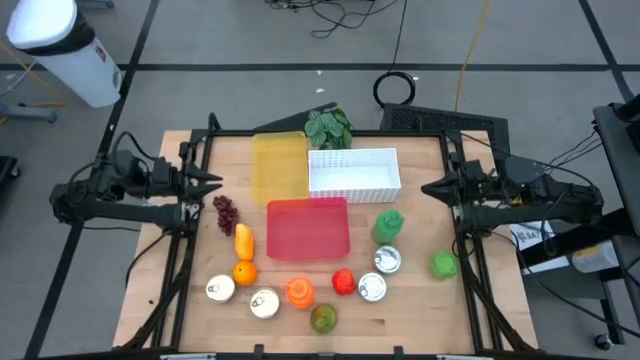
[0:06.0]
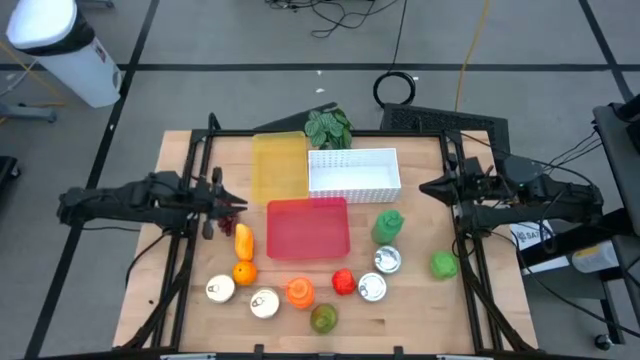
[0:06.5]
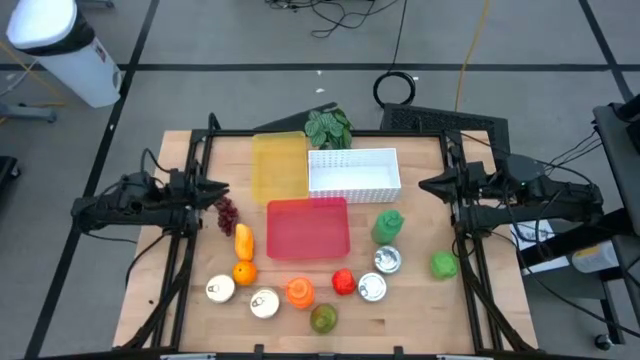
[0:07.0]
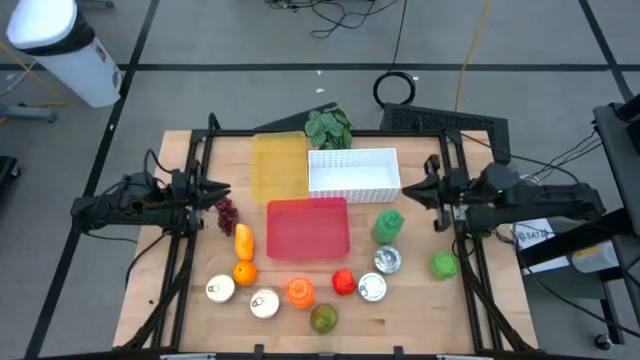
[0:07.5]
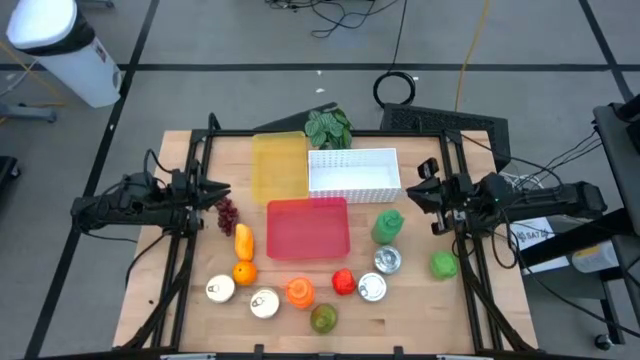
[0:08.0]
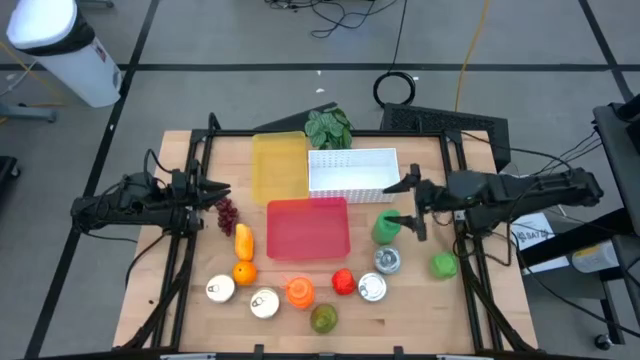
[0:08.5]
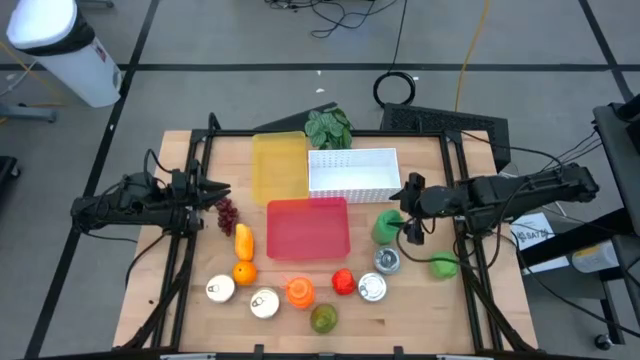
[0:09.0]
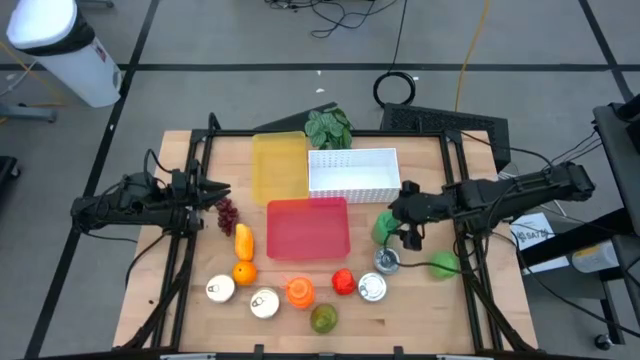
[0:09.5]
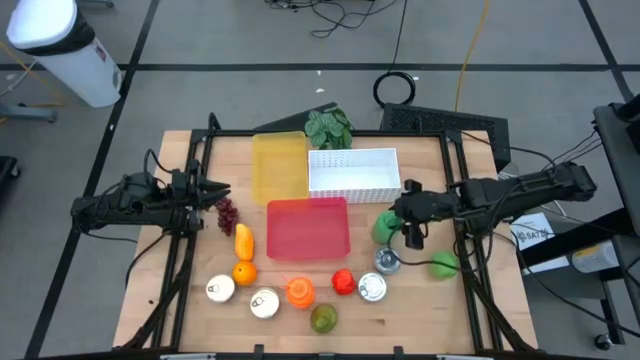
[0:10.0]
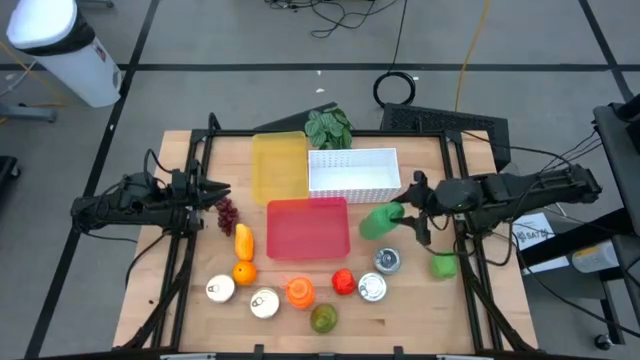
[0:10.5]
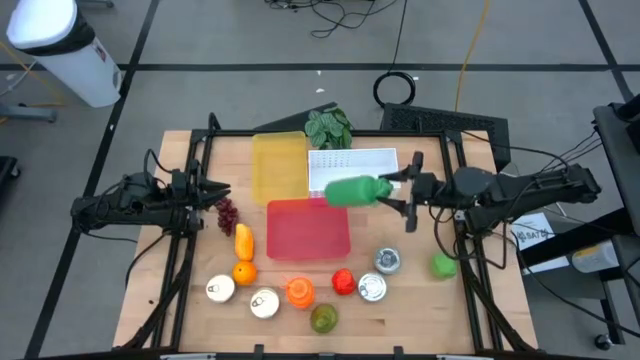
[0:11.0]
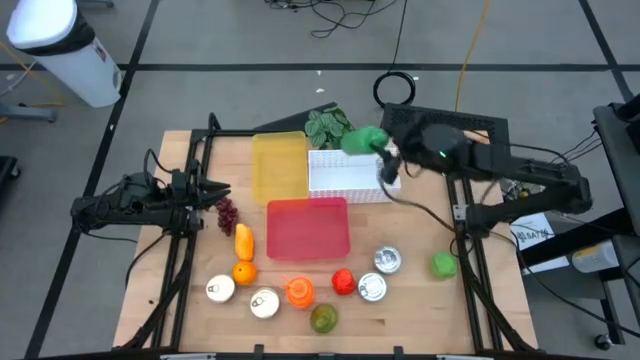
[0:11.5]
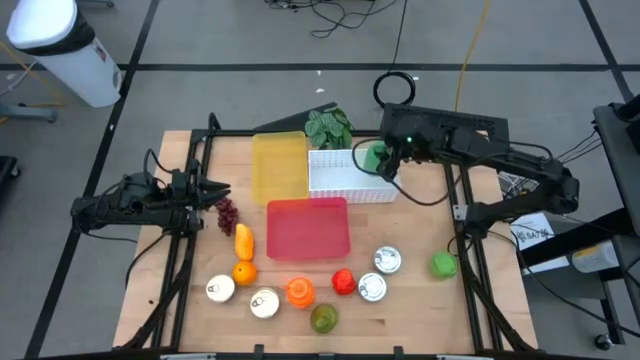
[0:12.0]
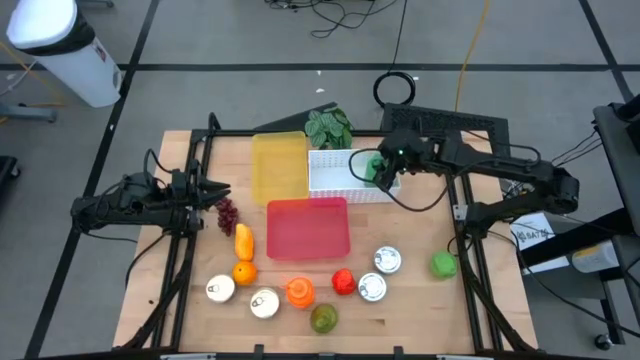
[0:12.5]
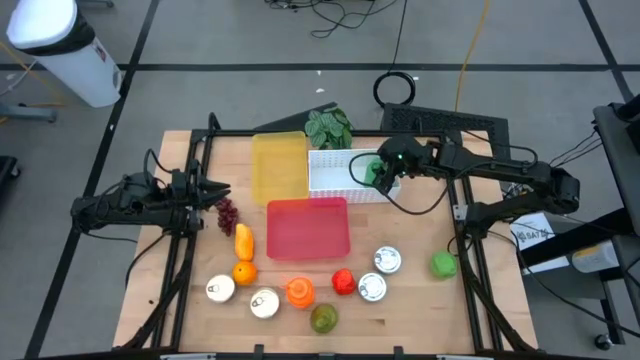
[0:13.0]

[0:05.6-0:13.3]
Task: Pick & Place Food Item
Put the green water bottle in the white bin

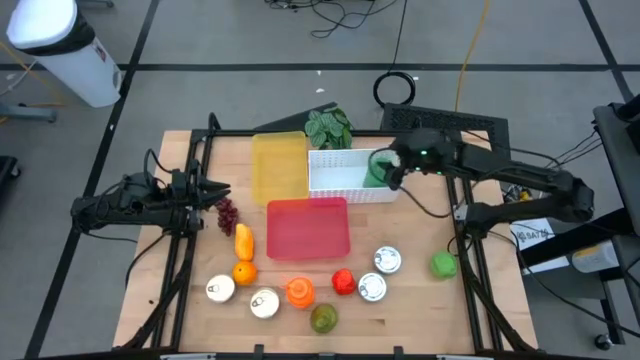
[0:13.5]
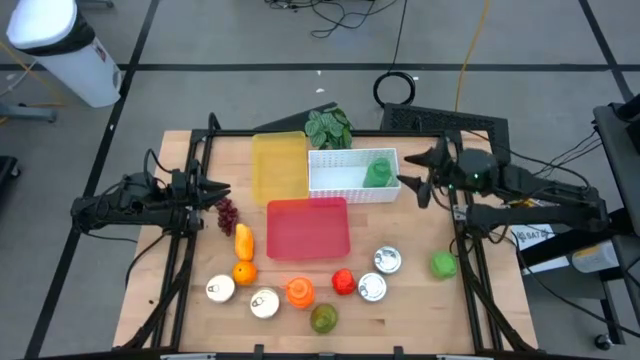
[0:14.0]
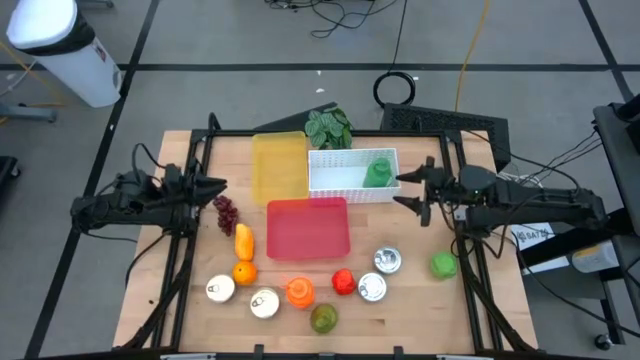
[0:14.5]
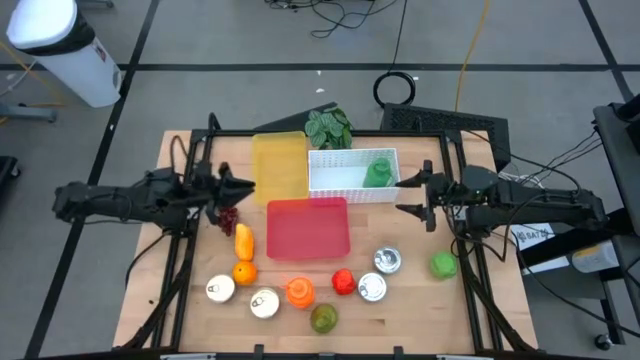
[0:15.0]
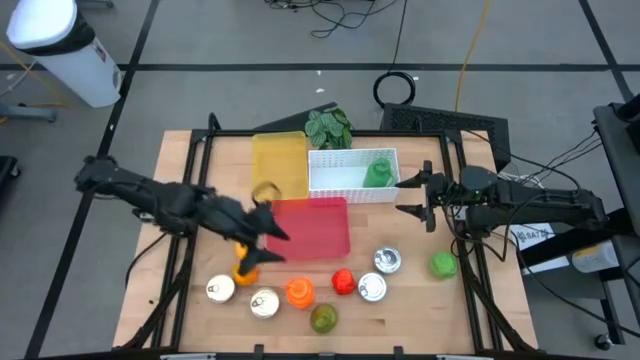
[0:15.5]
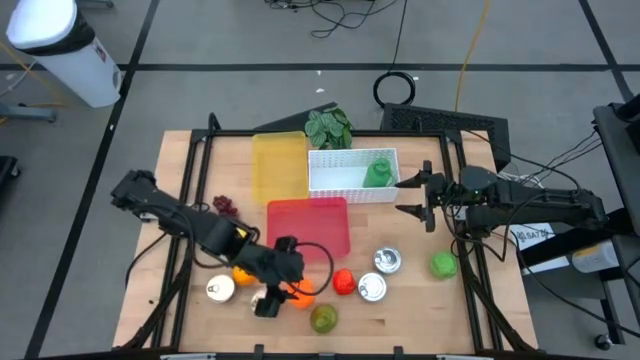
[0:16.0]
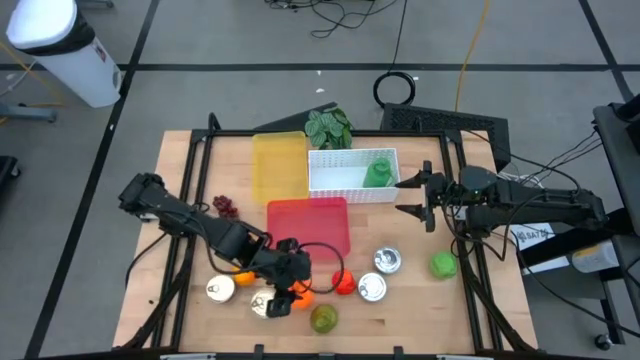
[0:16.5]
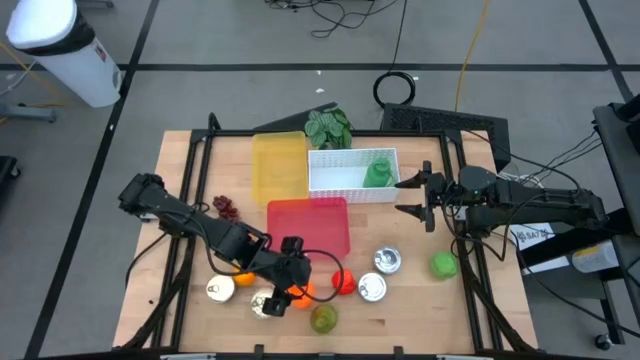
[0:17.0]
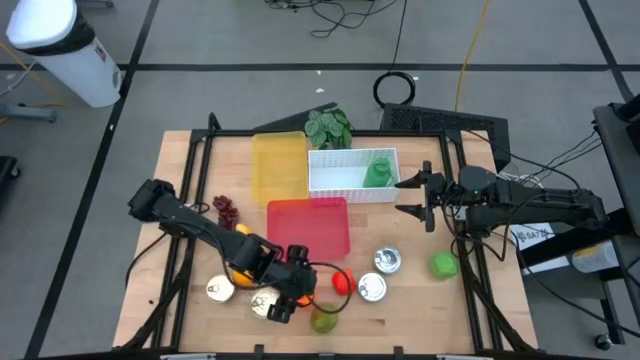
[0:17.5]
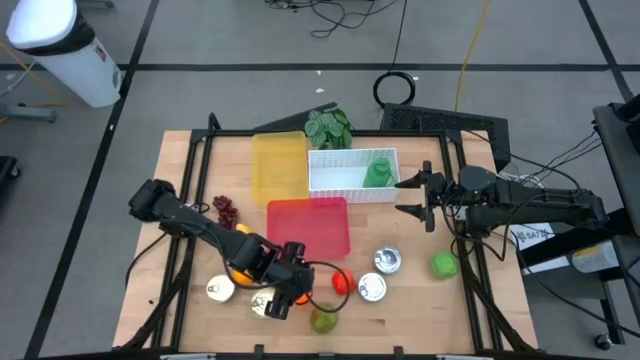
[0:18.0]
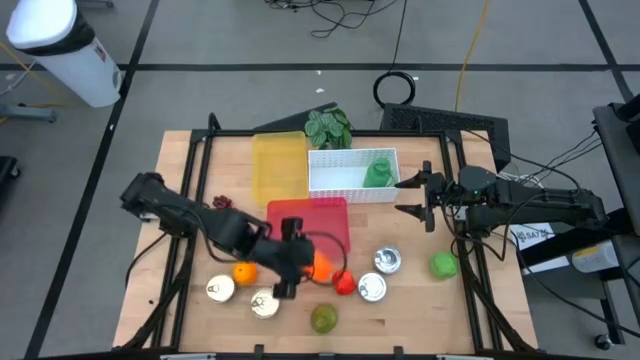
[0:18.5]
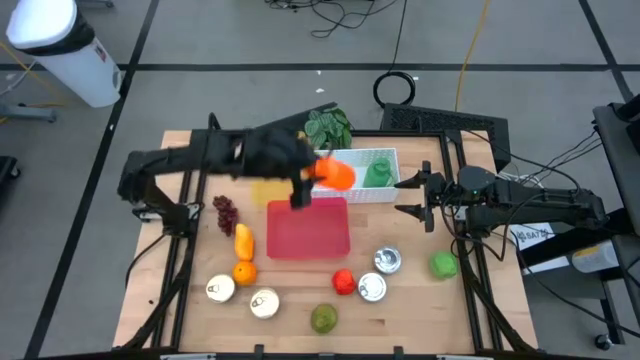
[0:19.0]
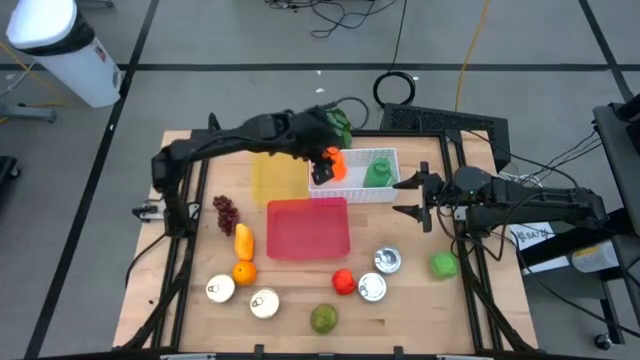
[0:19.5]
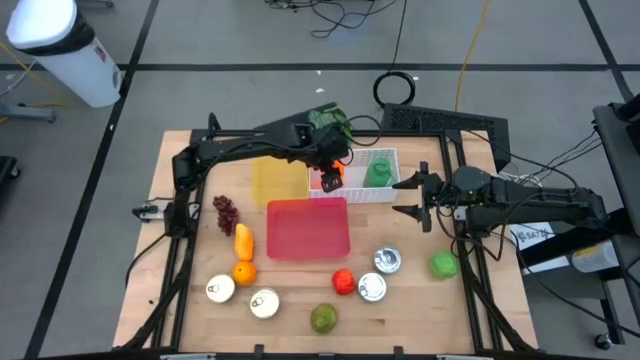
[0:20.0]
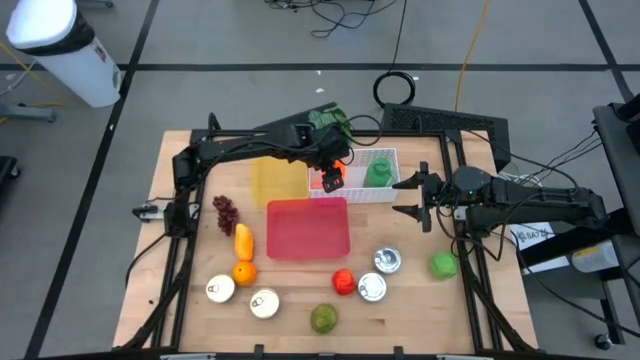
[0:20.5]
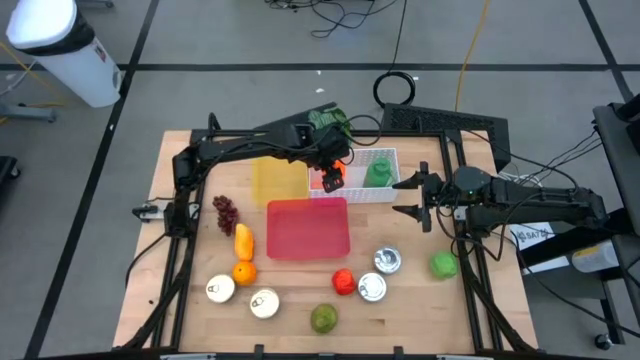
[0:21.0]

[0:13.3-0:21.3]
Put the orange water bottle in the white bin

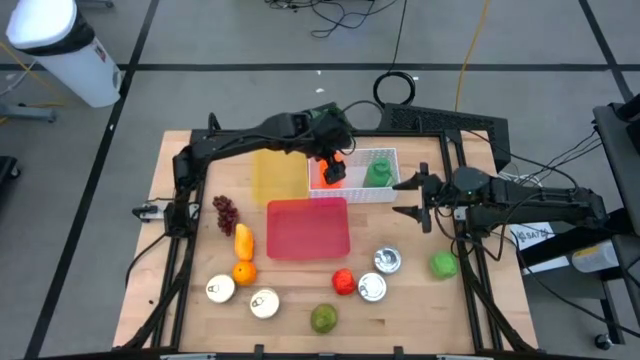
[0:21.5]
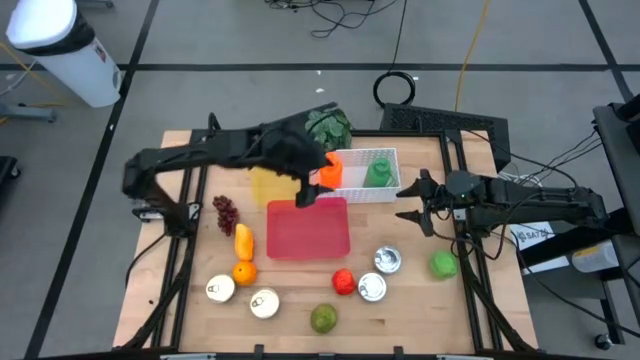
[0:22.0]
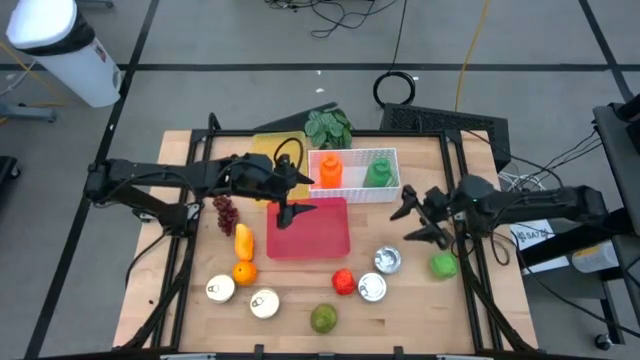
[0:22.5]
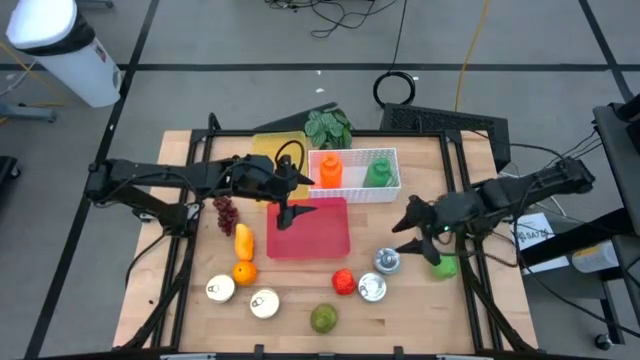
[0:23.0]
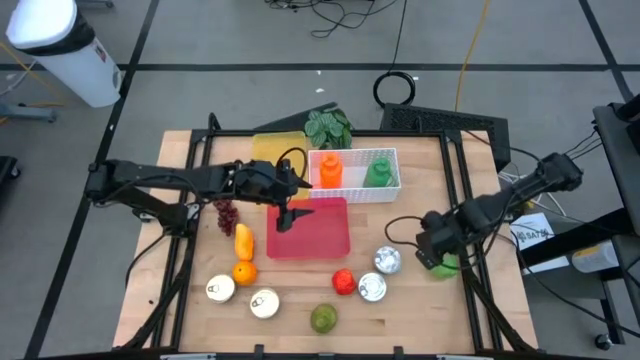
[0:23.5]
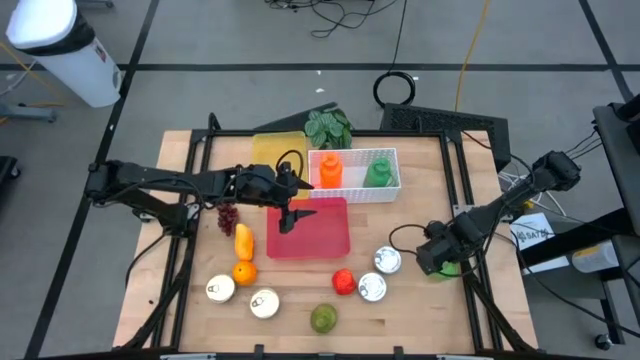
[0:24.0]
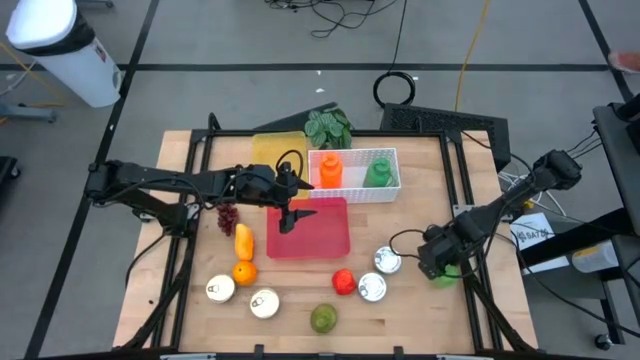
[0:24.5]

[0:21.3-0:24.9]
Put the green apple in the yellow bin
